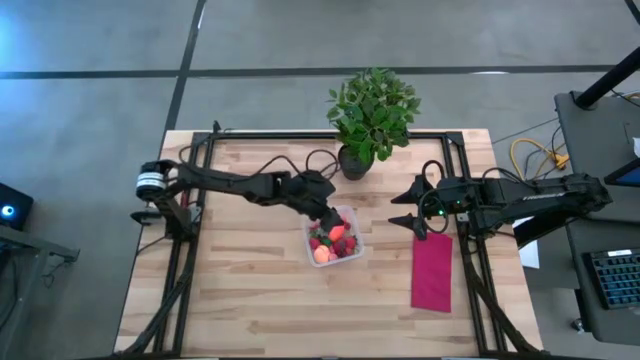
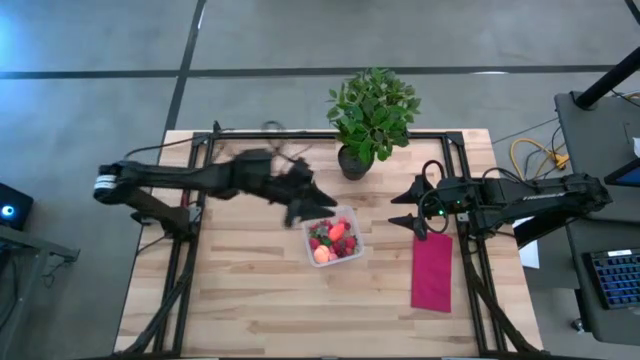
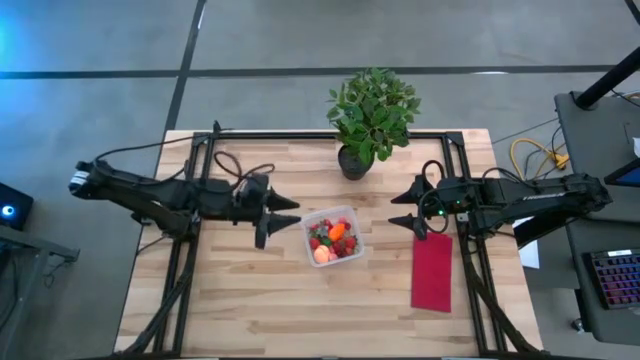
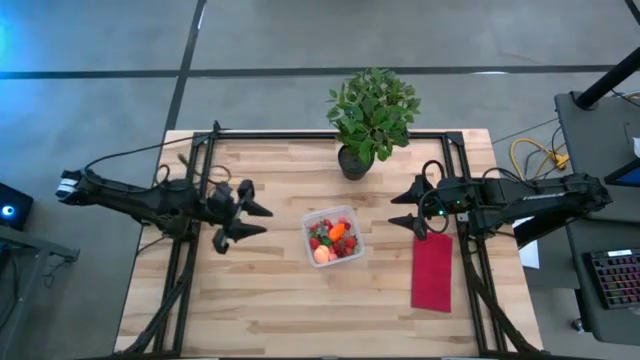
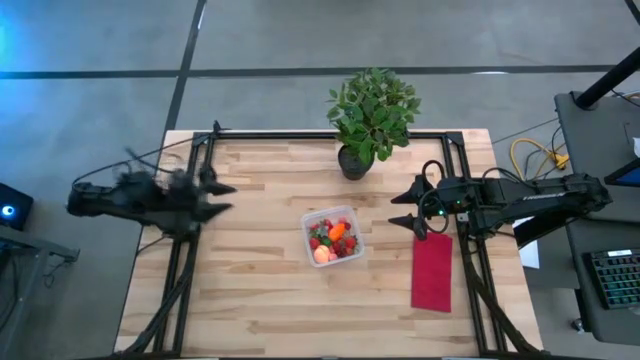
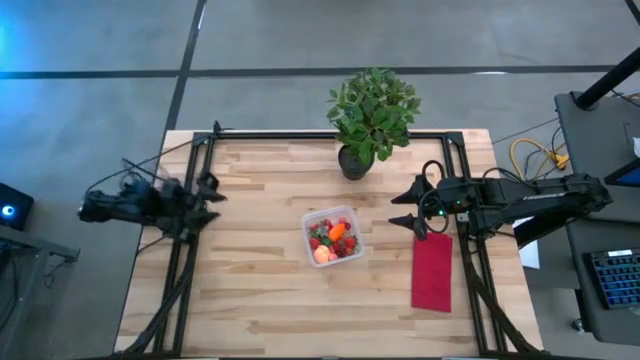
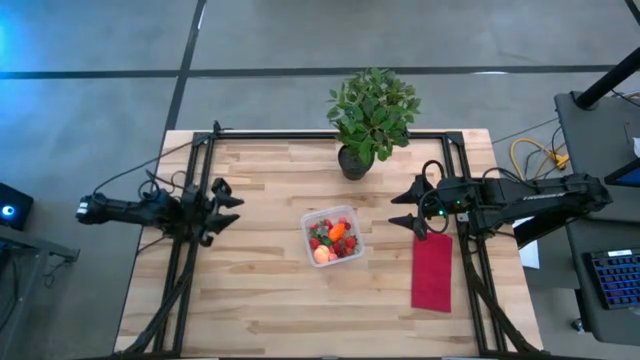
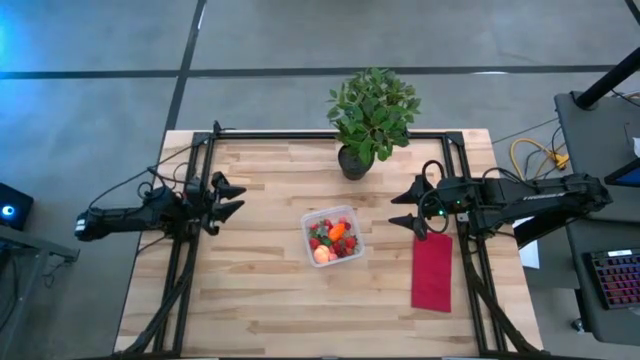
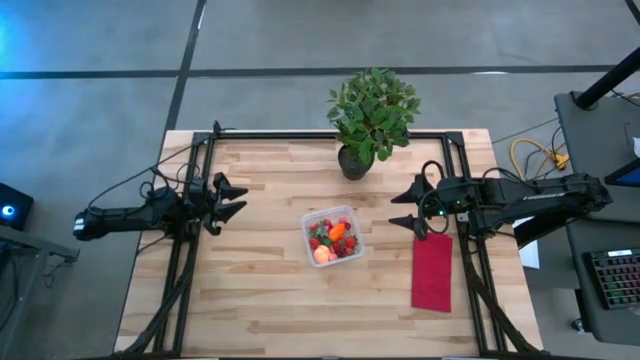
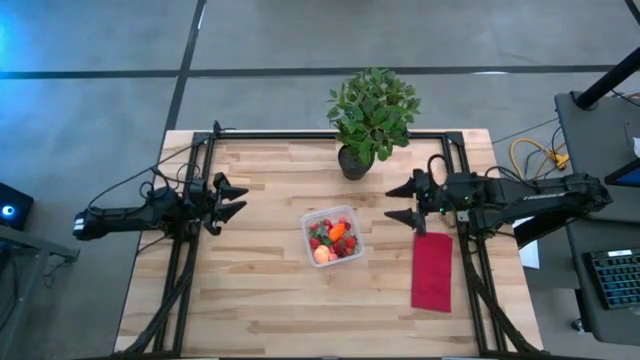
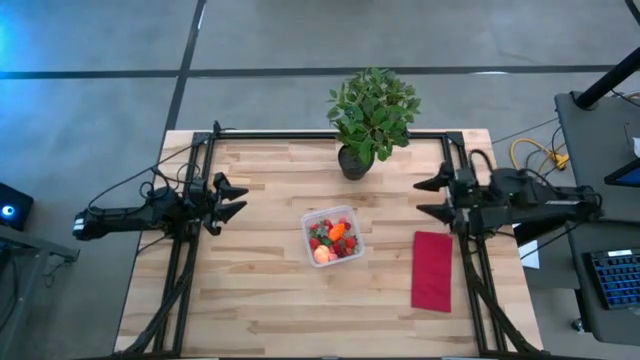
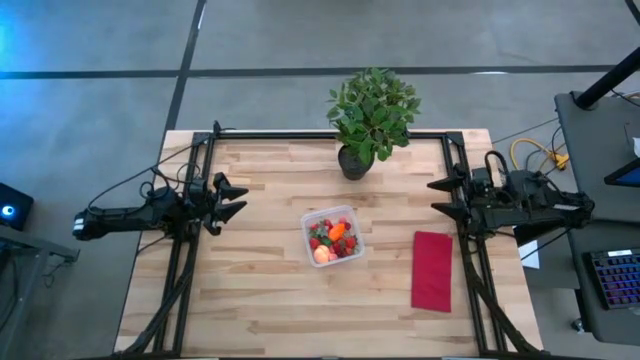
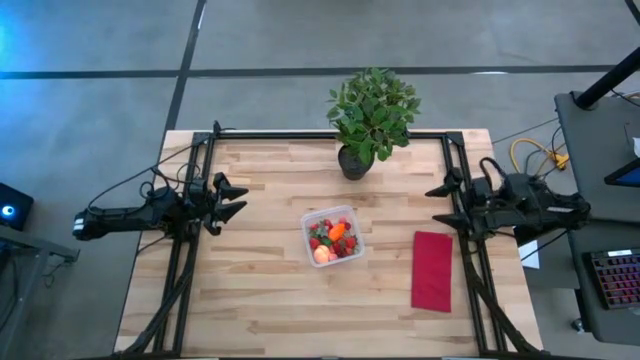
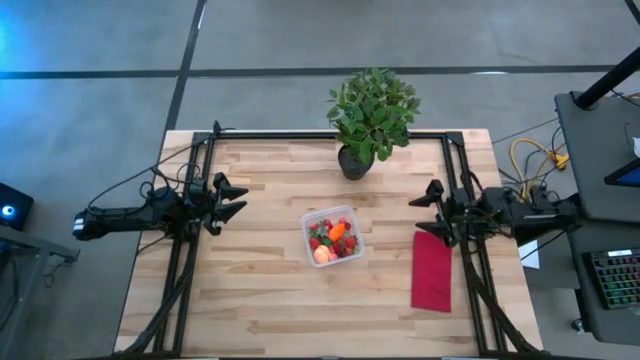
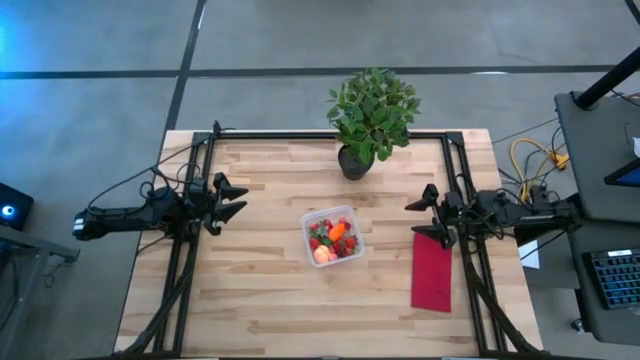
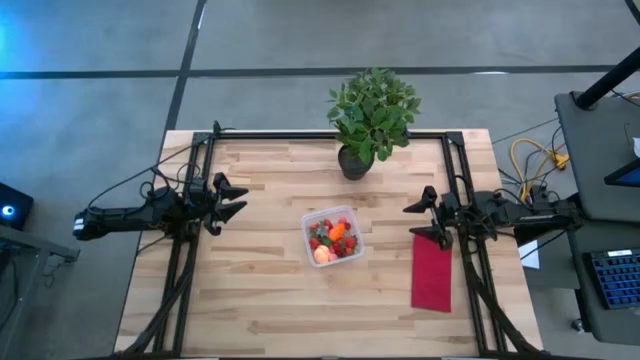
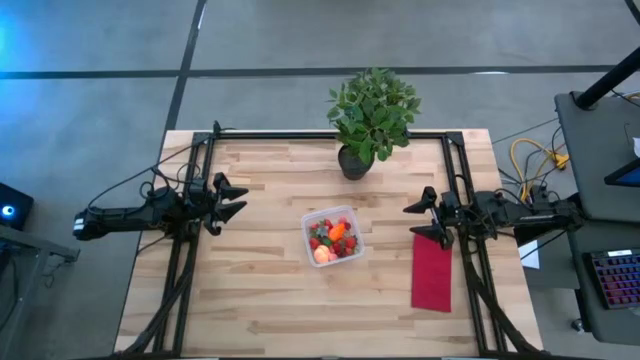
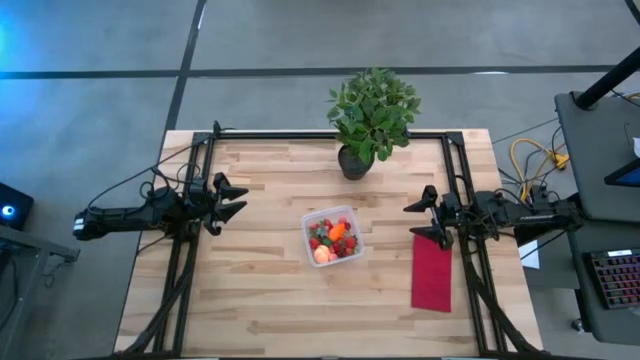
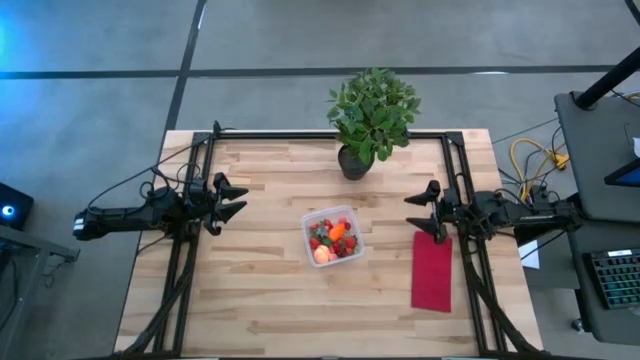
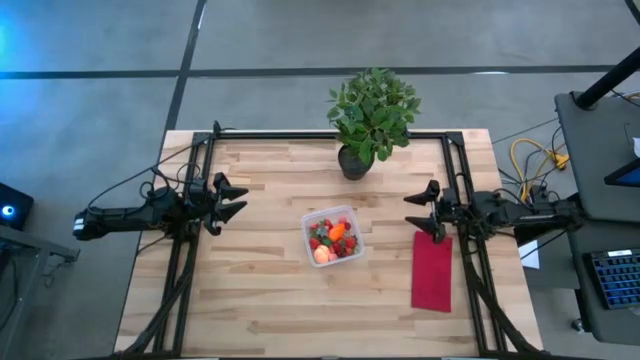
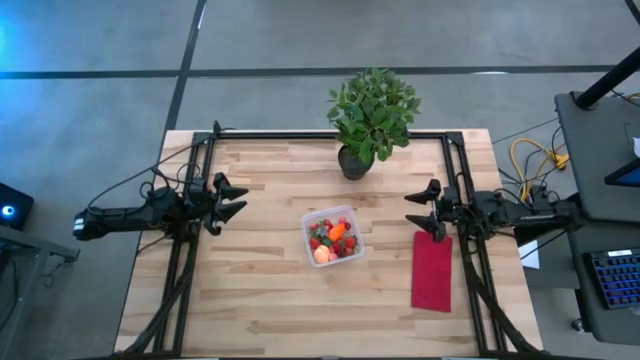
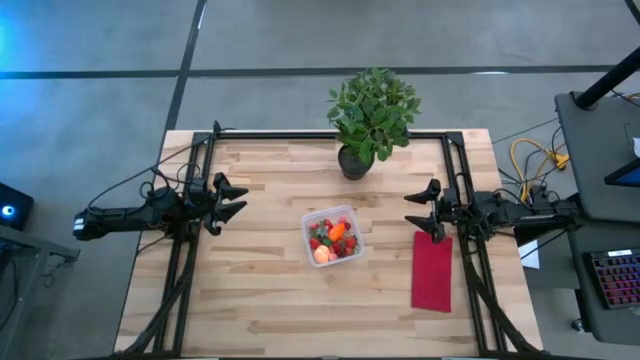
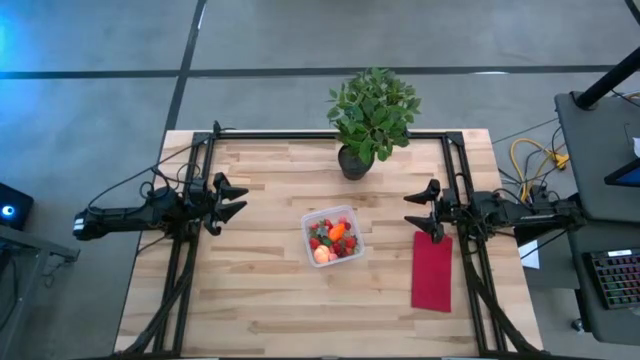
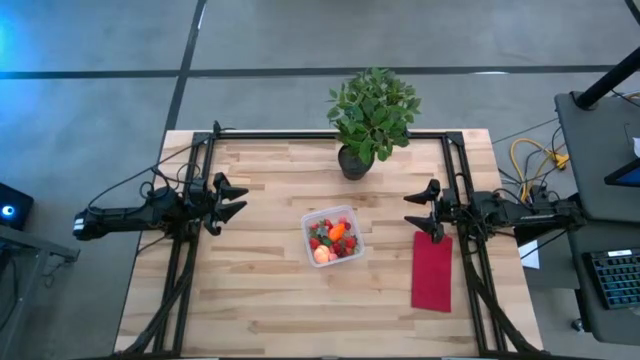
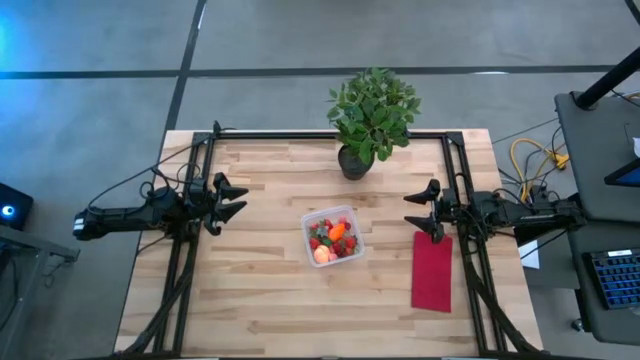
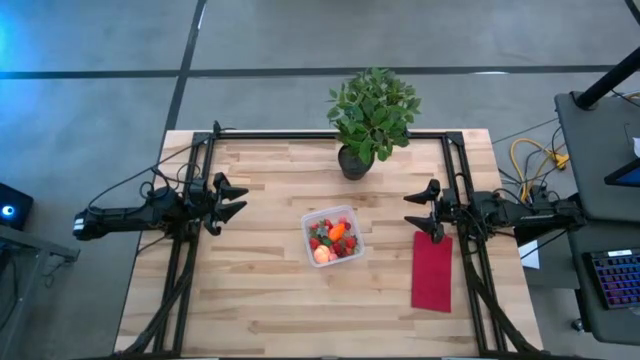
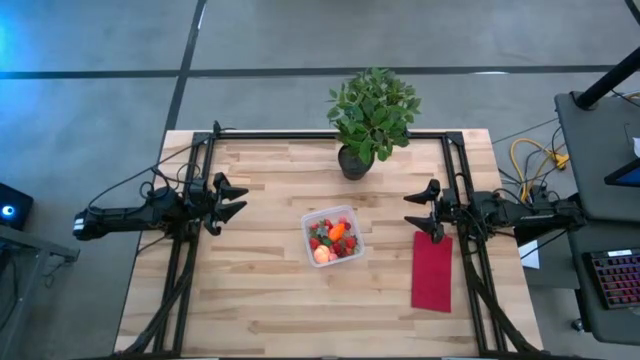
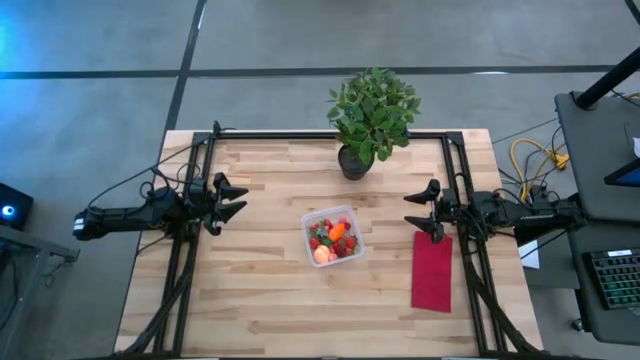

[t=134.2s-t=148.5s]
Task: Pick and placing Produce into tupperware
Return to Home Position

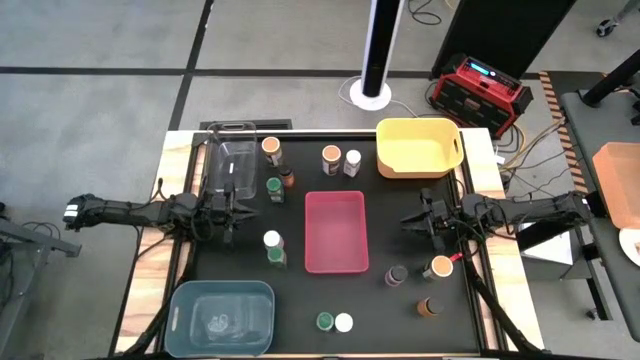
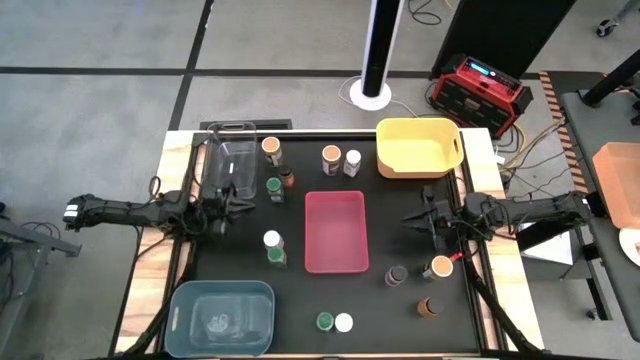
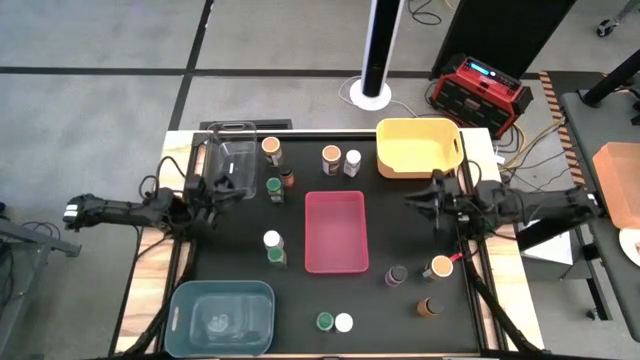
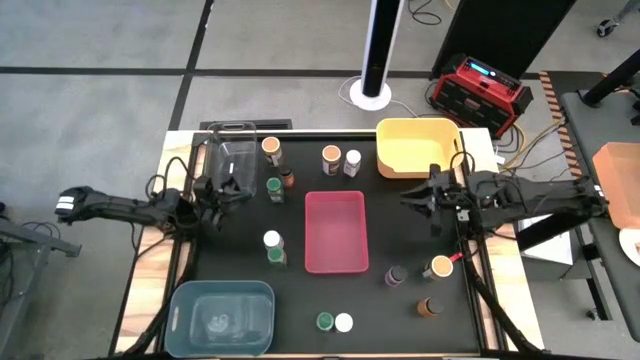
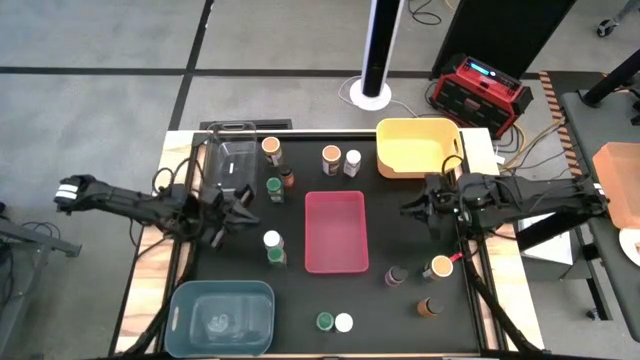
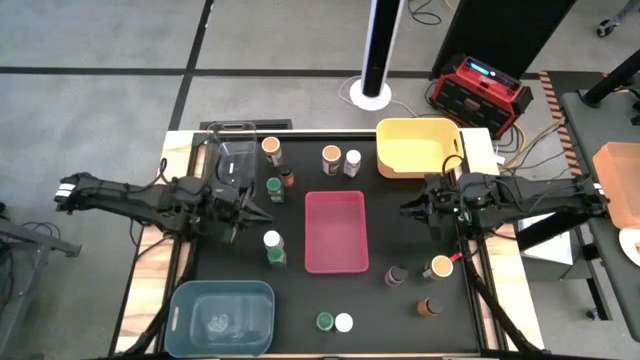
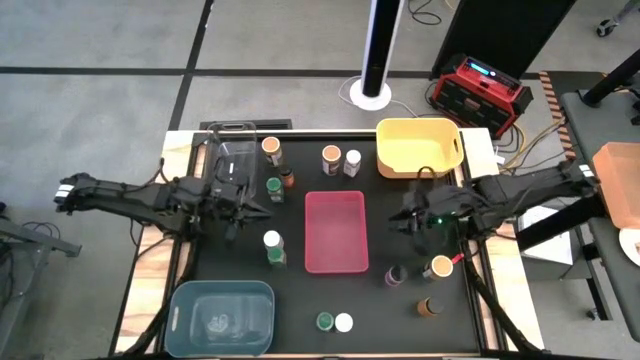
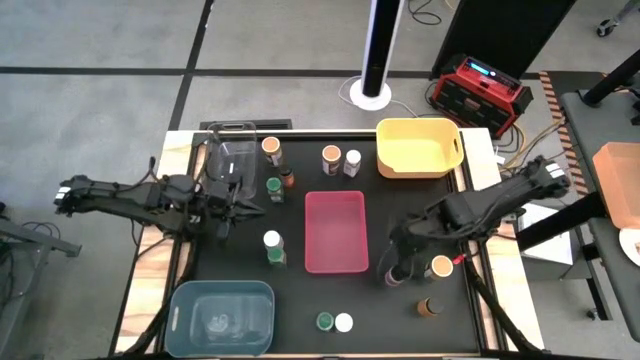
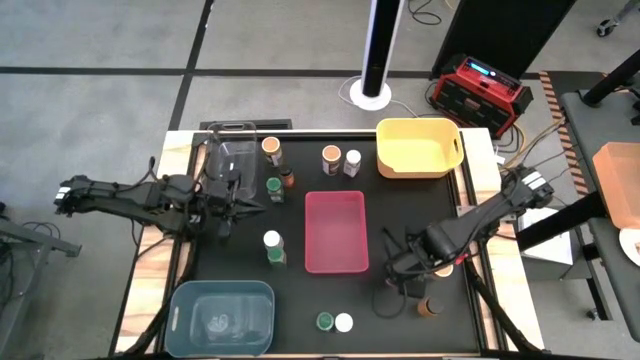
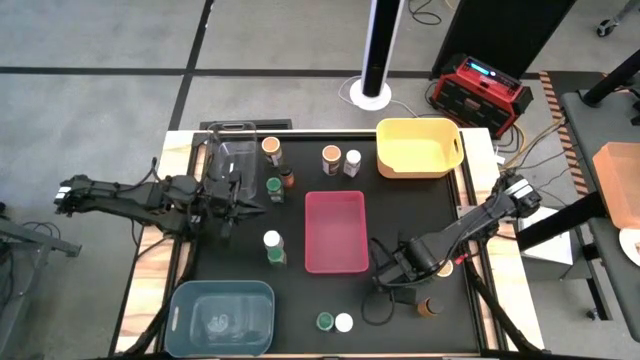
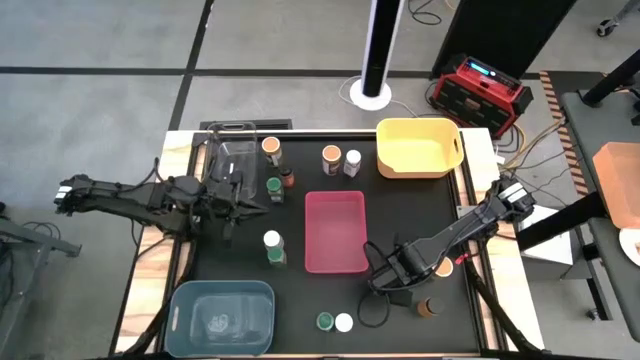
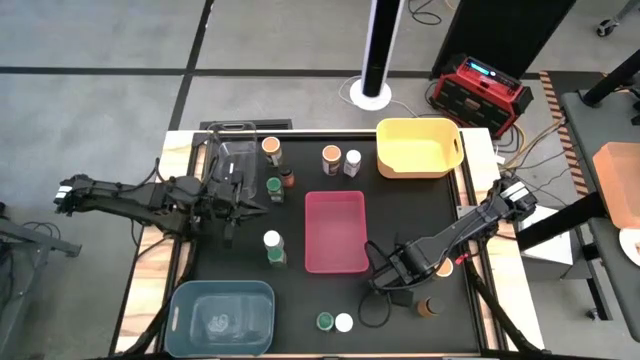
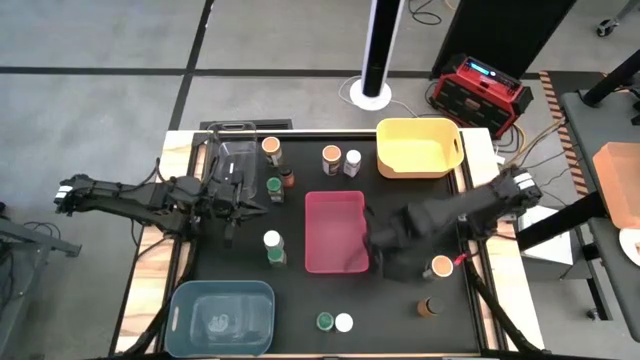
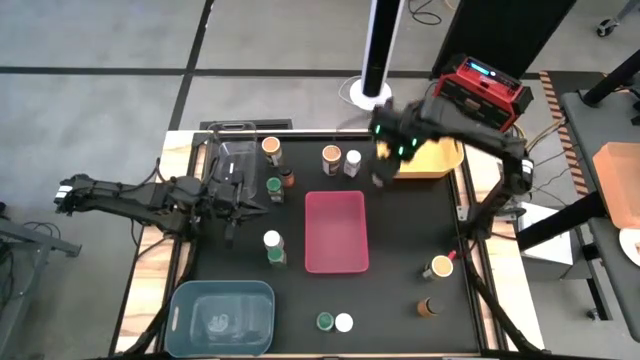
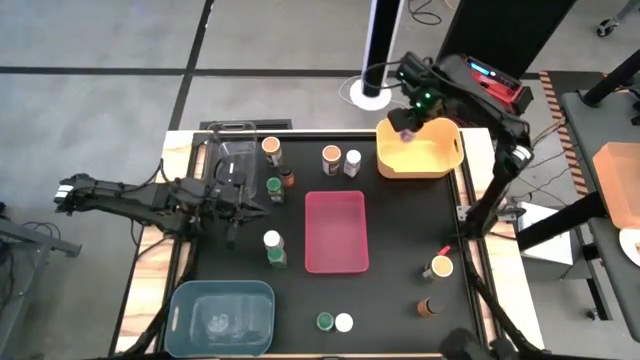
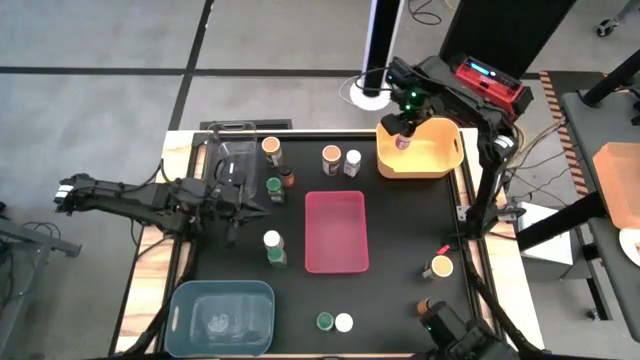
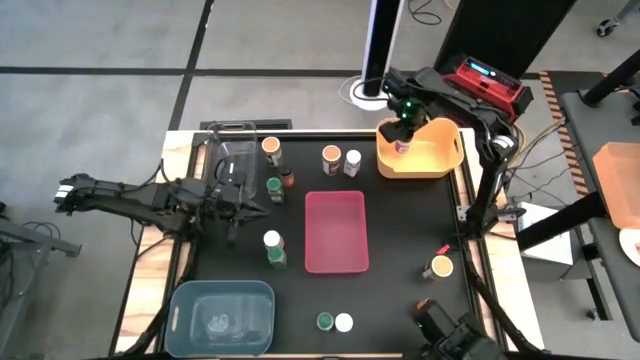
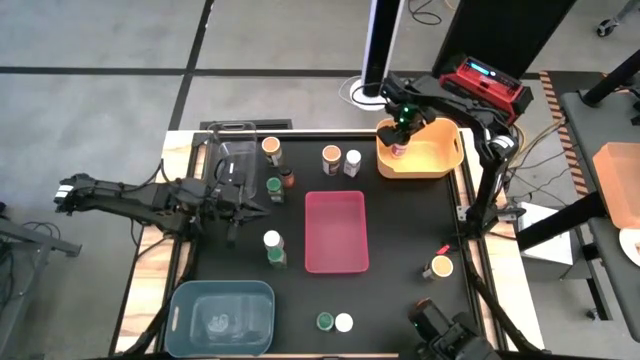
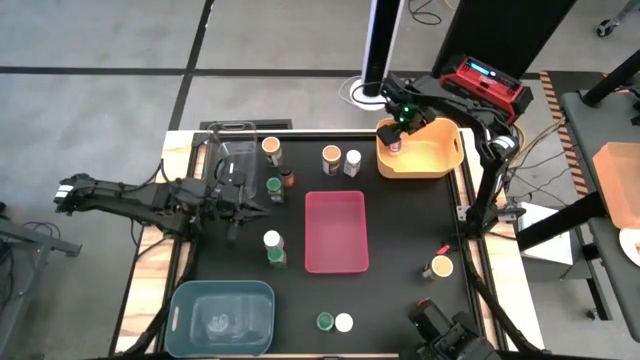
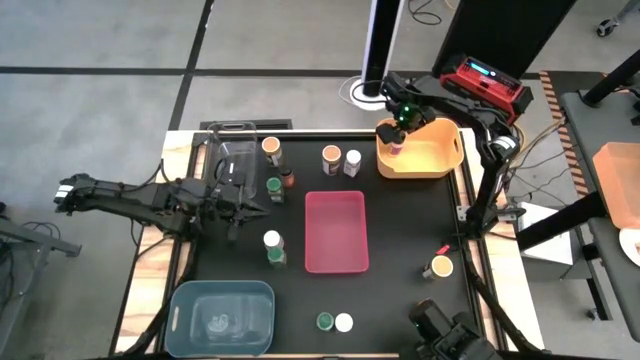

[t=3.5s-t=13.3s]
Task: Sort spices by type
Put the violet seasoning bottle into the yellow bin
